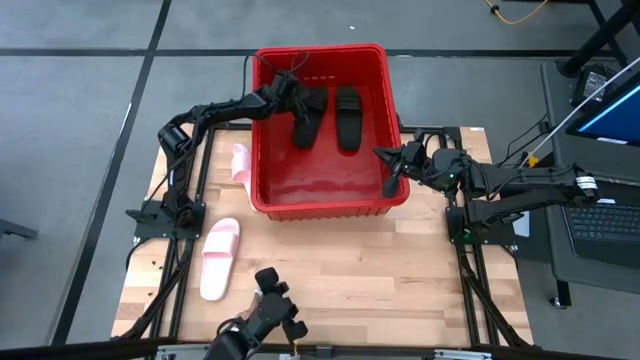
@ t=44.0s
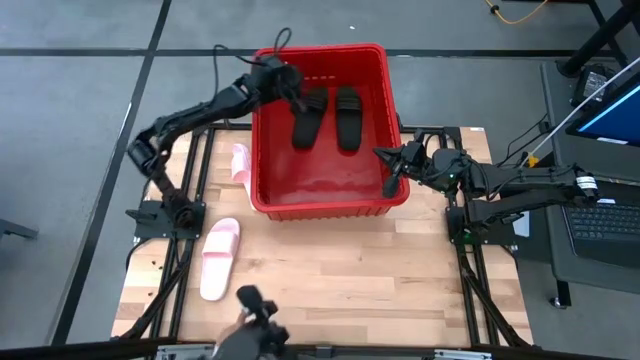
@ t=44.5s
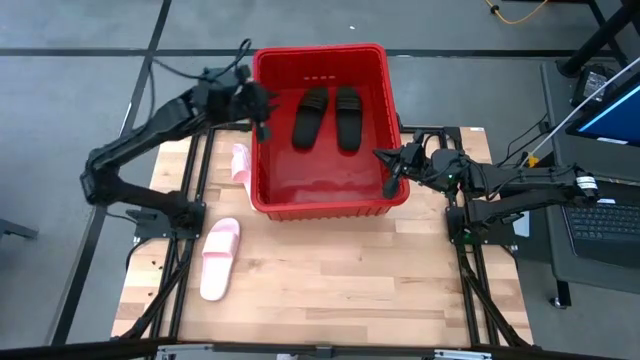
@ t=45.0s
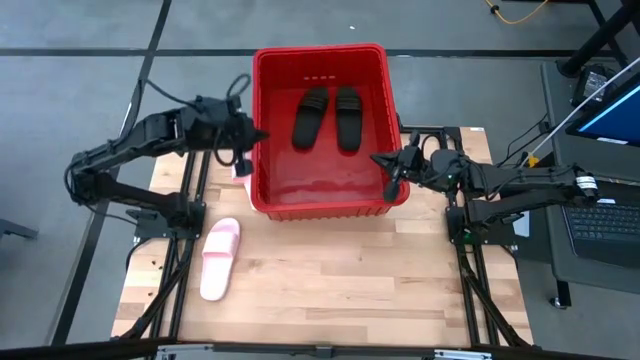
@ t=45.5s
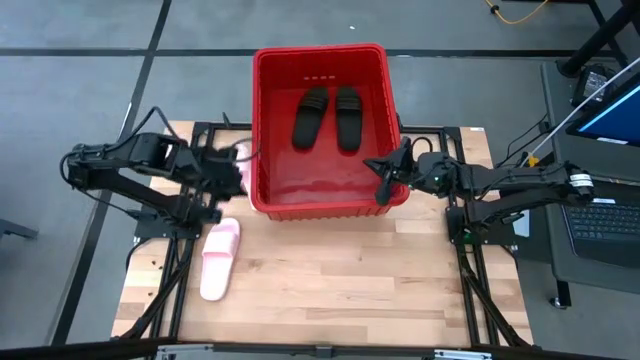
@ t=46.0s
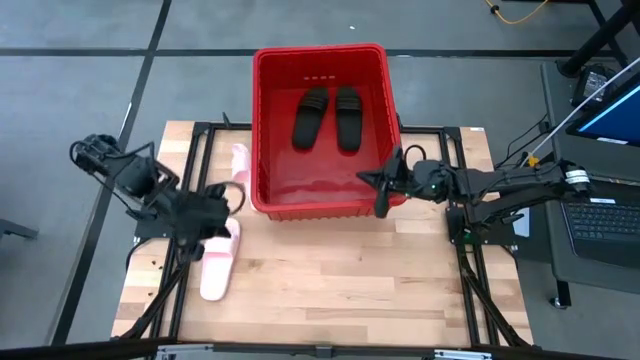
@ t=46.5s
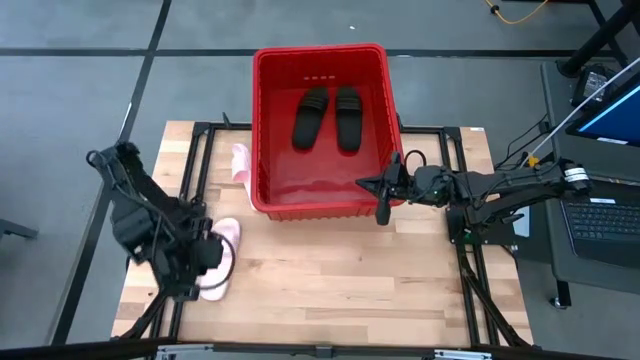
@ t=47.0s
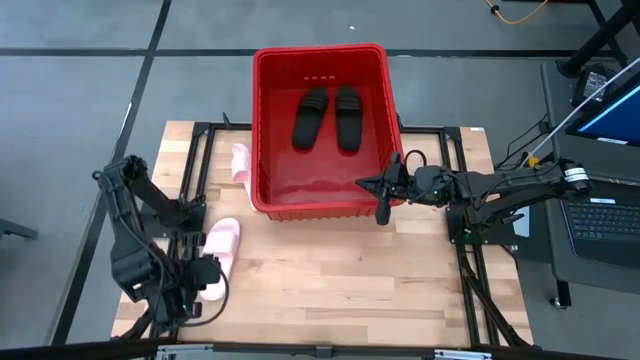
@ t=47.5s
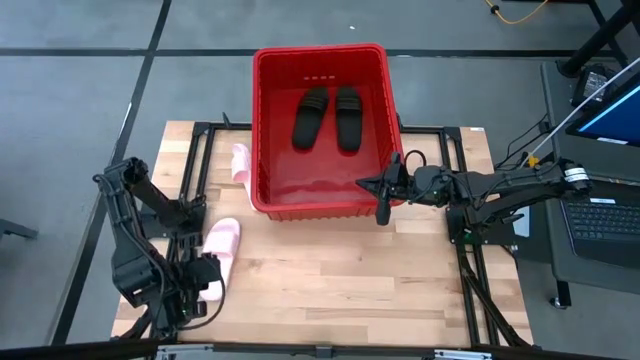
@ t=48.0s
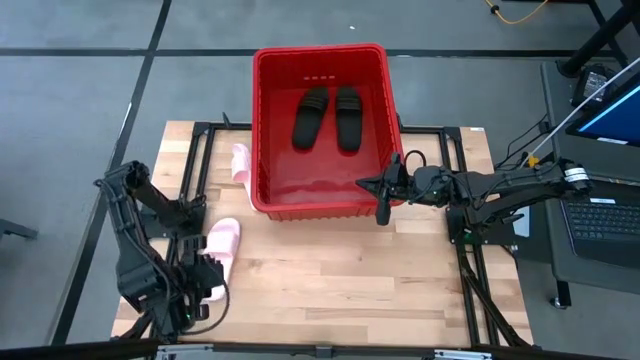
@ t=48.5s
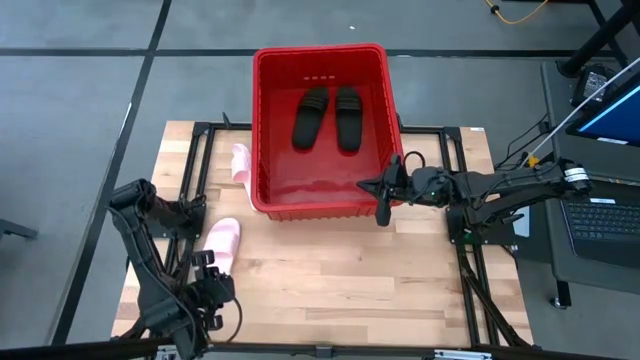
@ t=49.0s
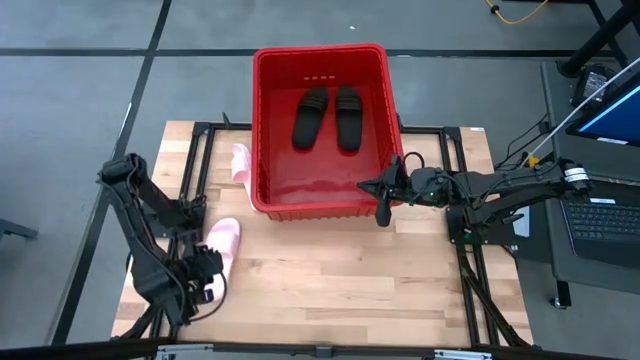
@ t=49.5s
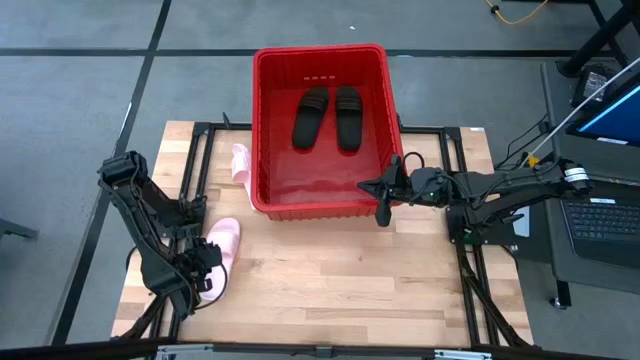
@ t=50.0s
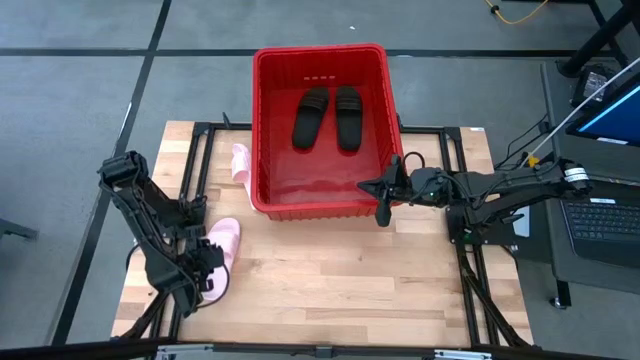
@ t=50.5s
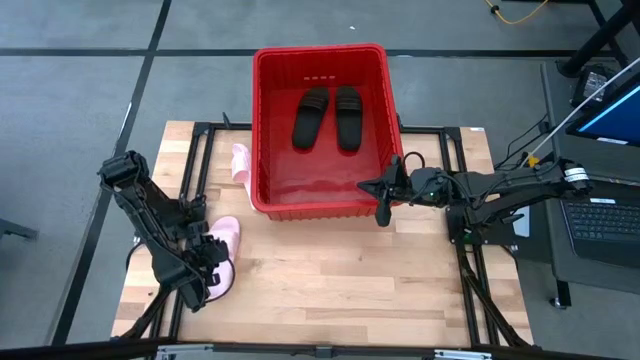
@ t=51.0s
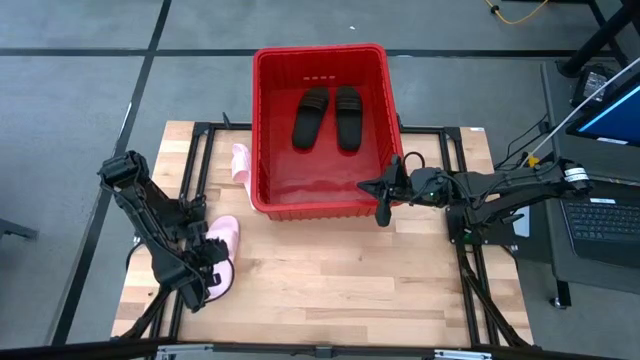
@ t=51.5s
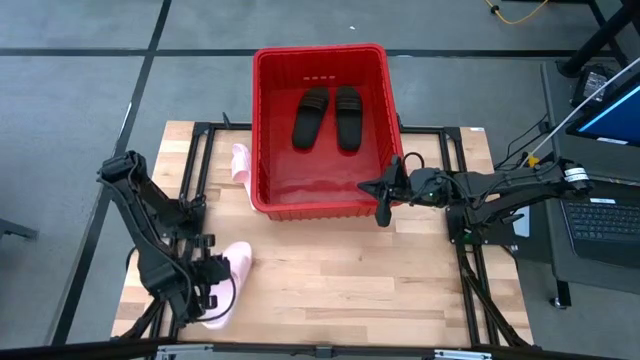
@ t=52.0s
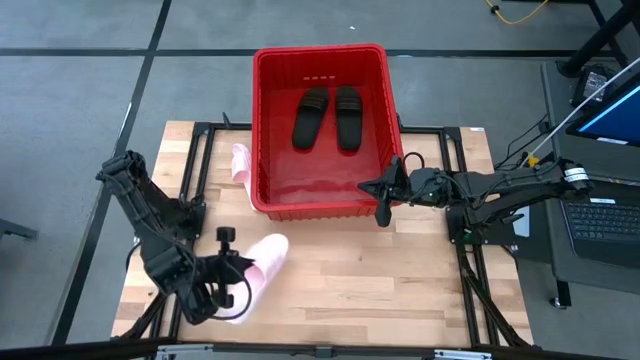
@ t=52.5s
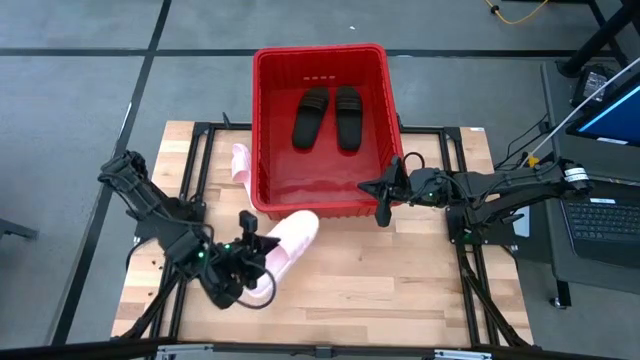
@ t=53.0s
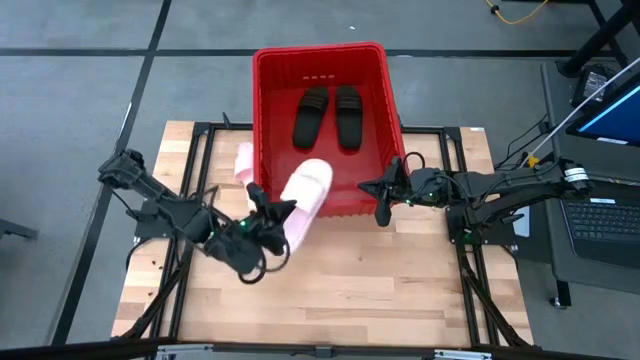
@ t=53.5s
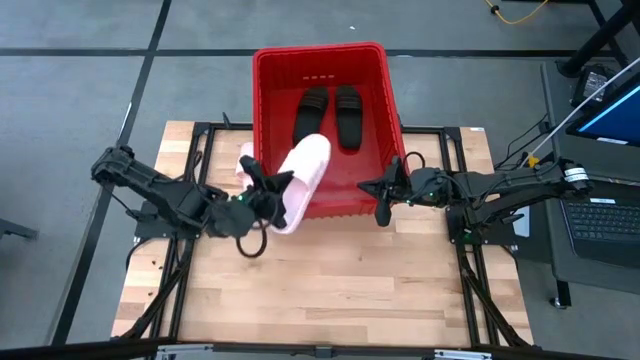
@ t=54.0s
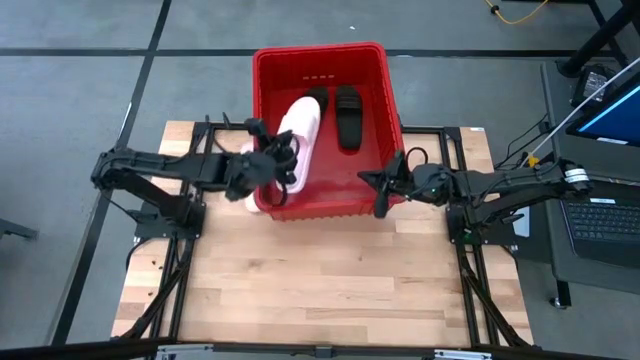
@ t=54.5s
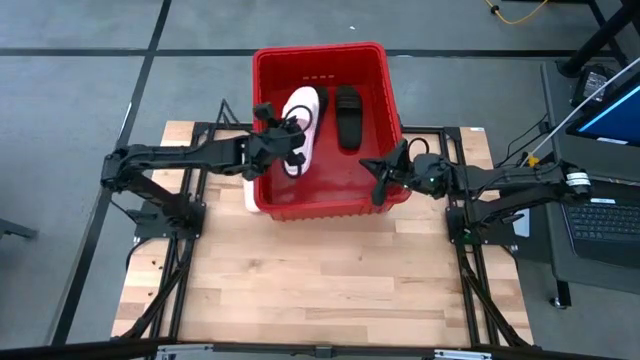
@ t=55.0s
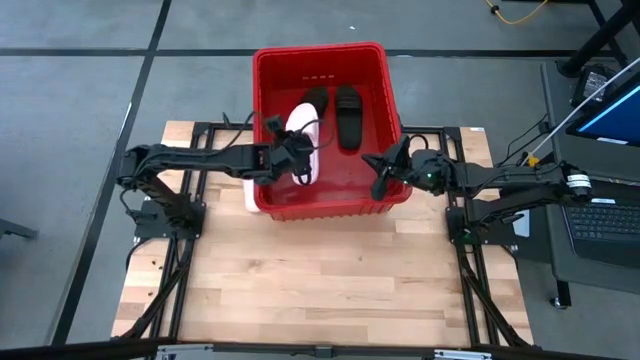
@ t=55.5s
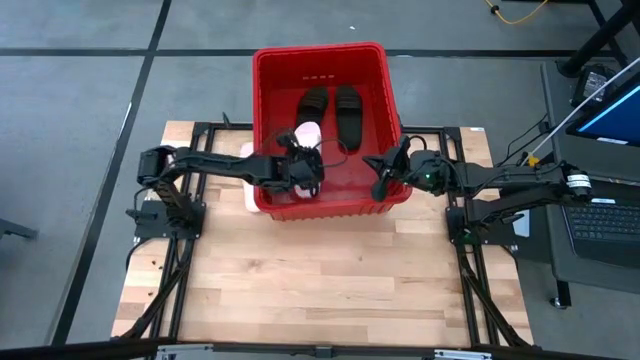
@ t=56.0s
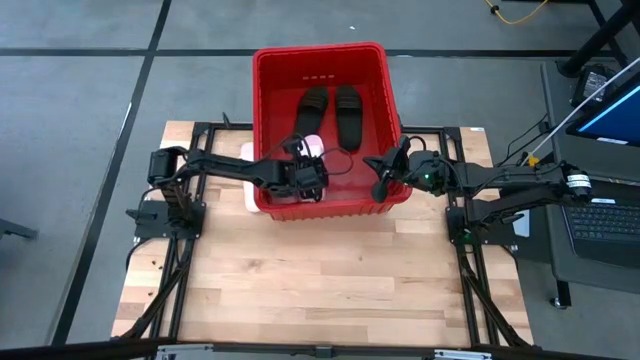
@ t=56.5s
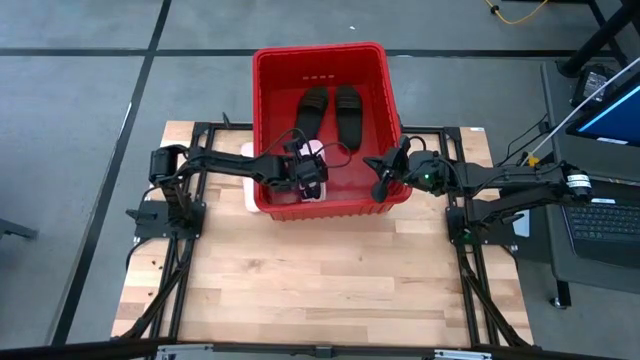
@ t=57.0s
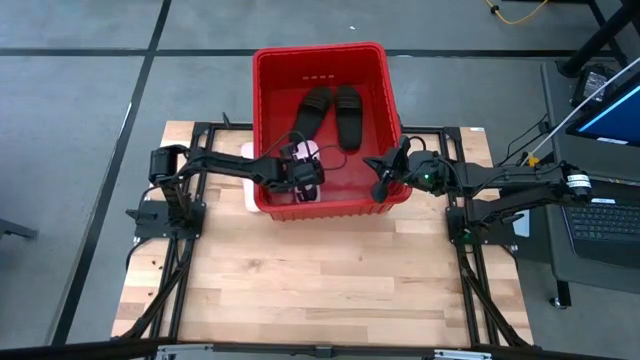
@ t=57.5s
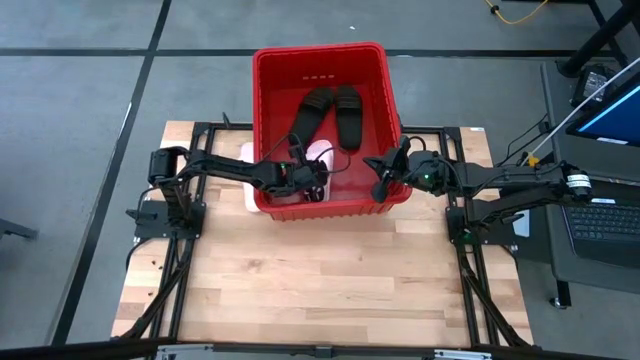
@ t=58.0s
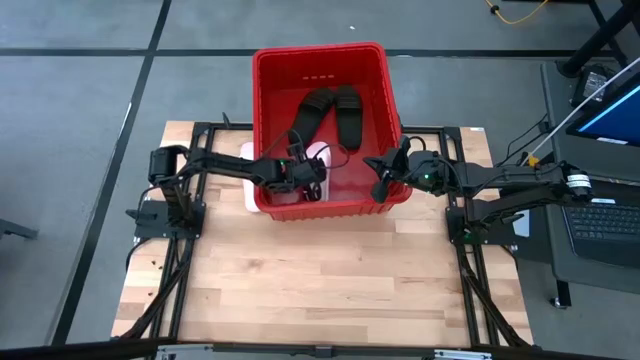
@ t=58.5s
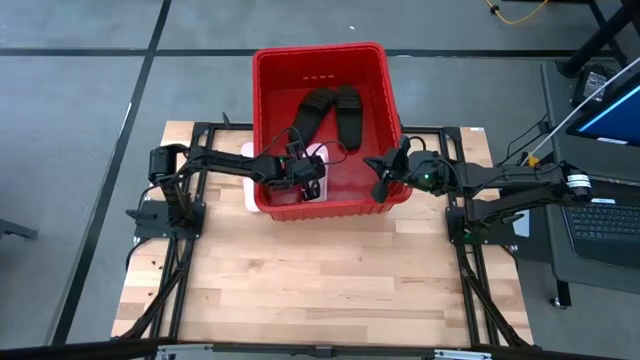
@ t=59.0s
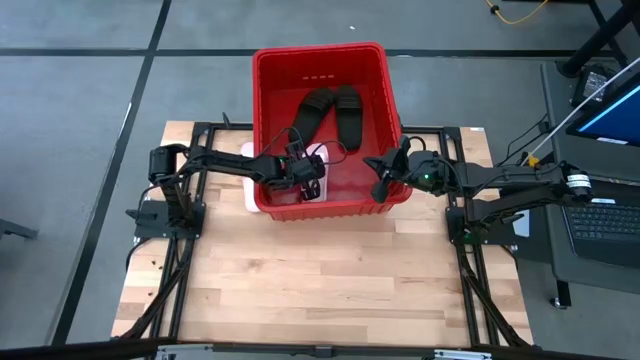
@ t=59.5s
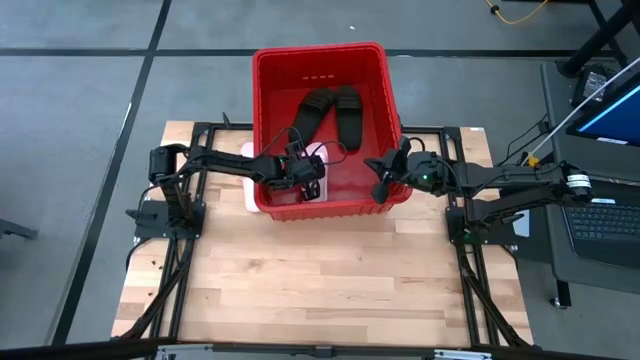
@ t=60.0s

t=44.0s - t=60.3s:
Task: Pick and place slides into bin
Put the bottom pink slide in the red bin

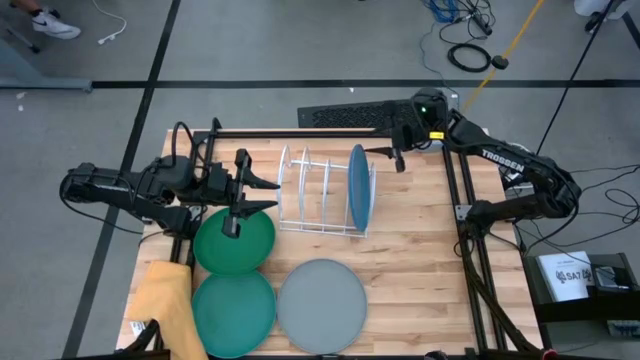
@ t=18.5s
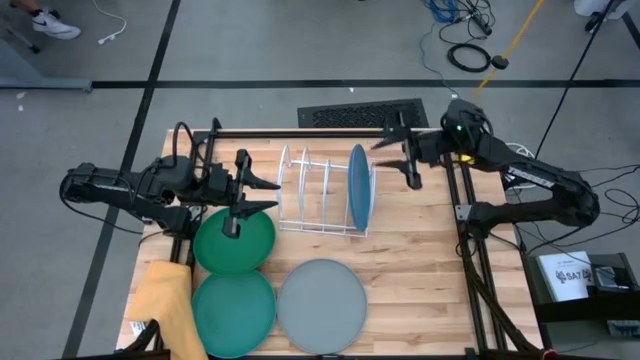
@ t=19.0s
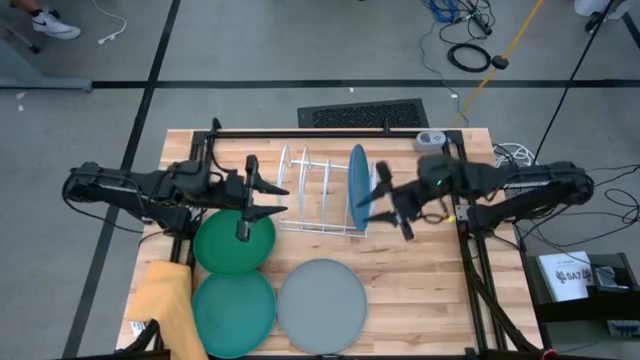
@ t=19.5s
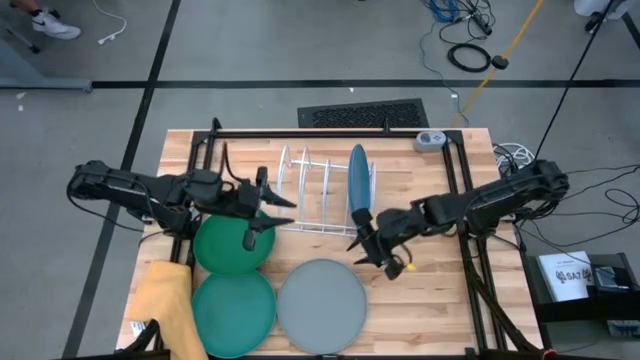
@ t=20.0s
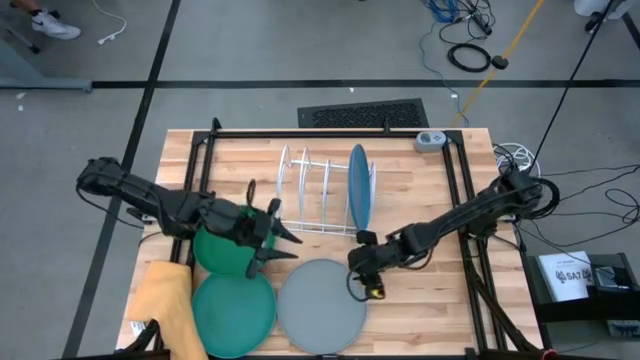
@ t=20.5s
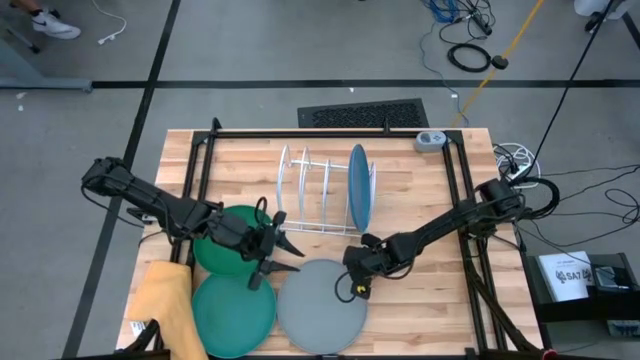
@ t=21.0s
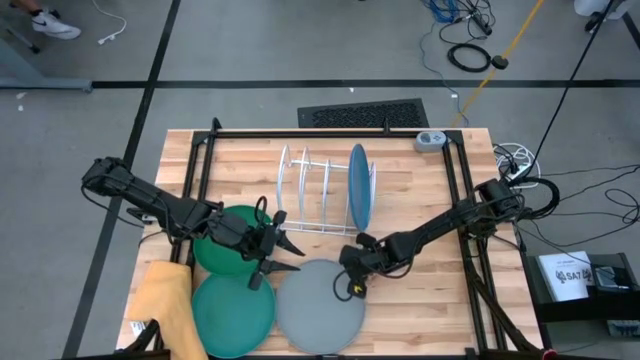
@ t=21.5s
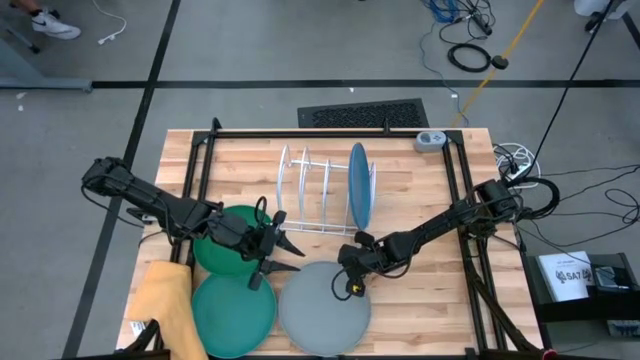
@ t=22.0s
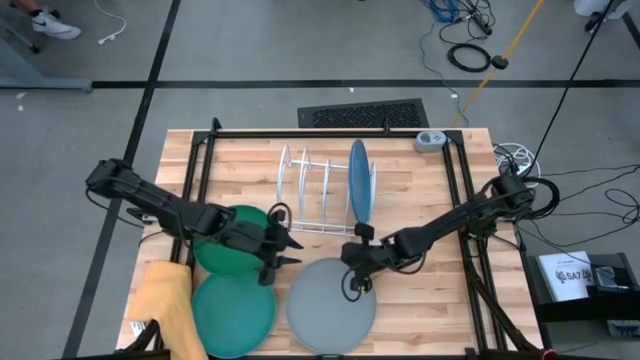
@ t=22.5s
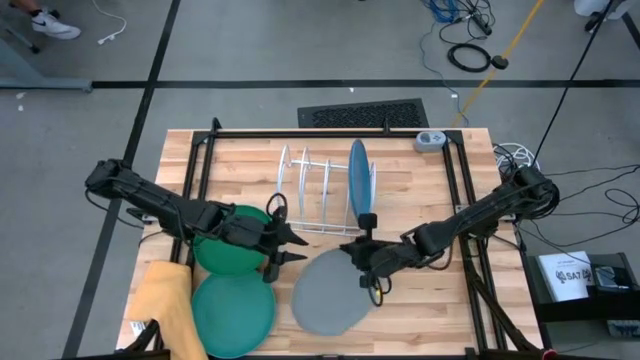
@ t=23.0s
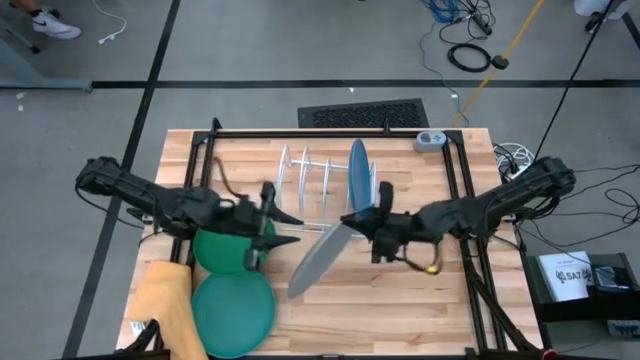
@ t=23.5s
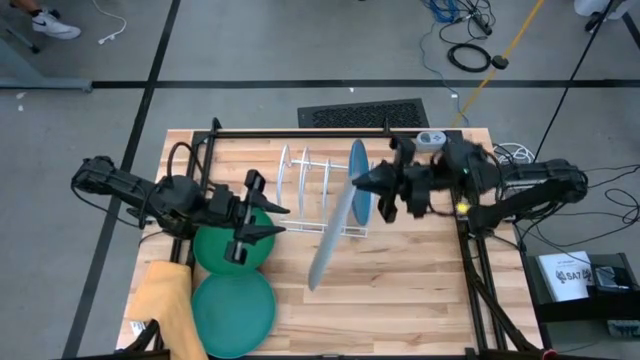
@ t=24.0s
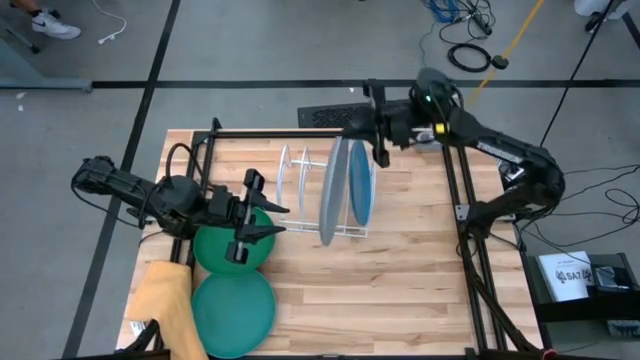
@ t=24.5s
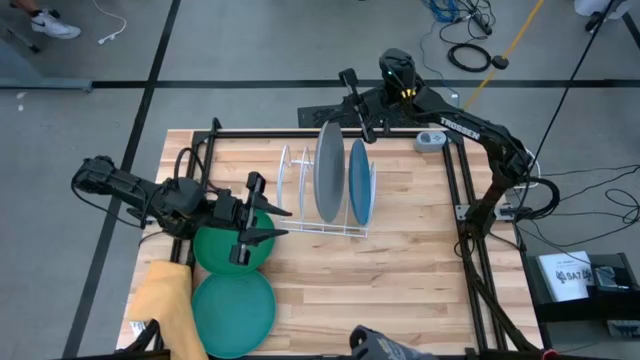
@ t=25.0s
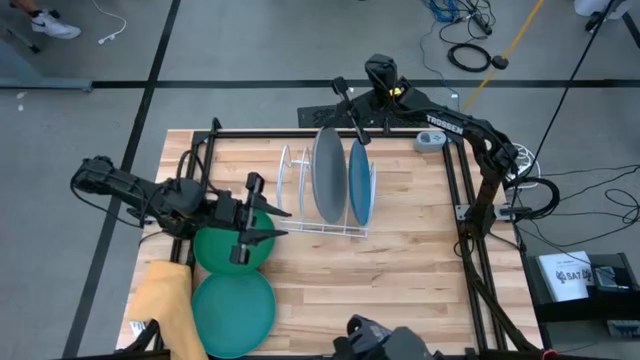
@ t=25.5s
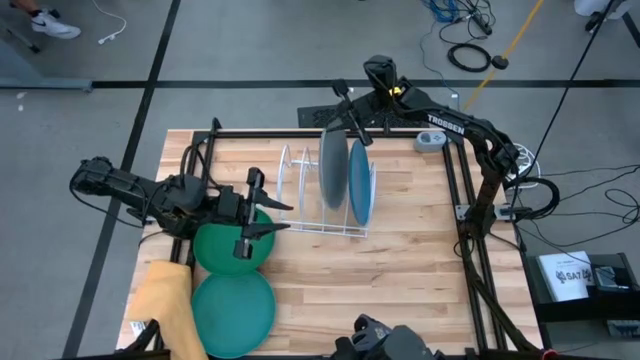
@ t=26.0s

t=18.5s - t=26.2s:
Task: Sort dishes
Put the gray plate in the dish rack
